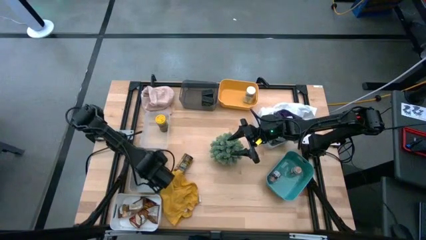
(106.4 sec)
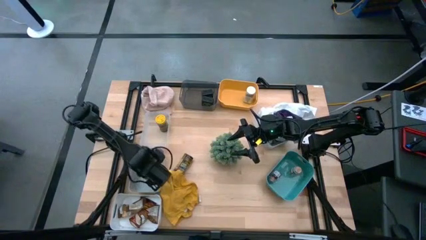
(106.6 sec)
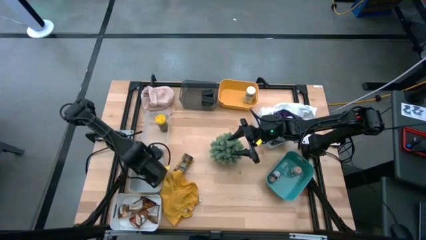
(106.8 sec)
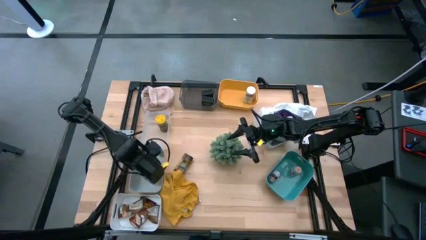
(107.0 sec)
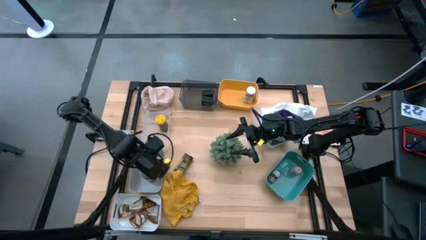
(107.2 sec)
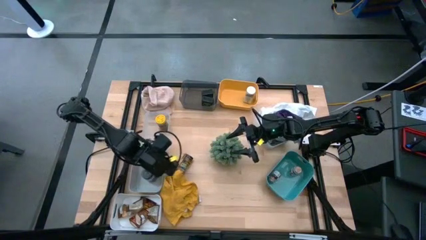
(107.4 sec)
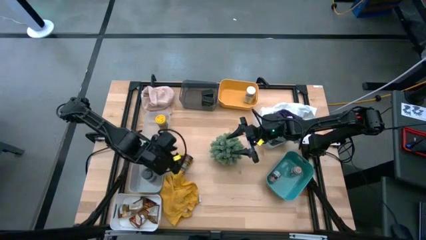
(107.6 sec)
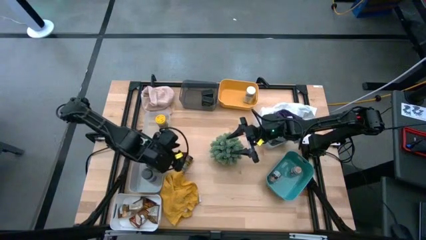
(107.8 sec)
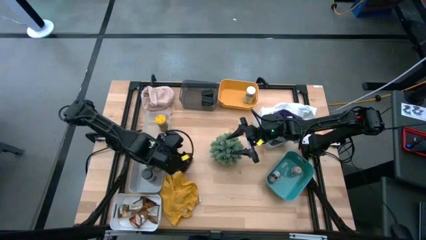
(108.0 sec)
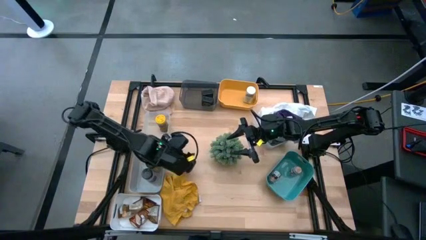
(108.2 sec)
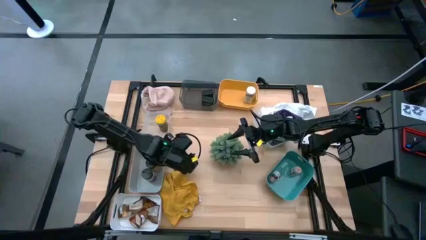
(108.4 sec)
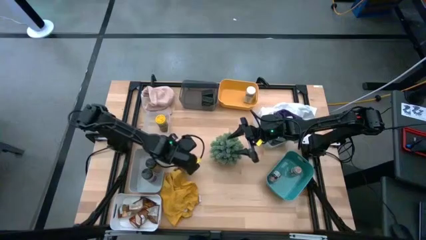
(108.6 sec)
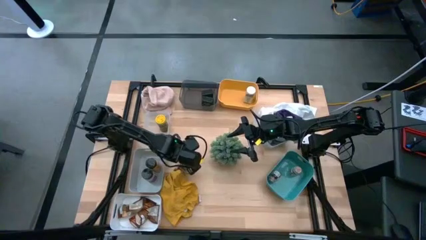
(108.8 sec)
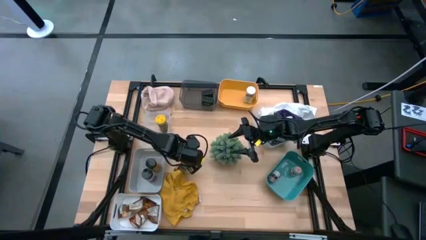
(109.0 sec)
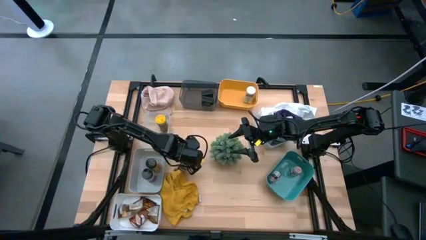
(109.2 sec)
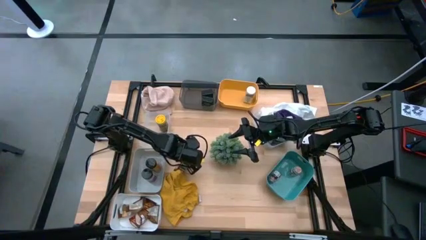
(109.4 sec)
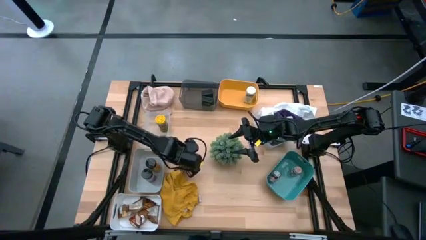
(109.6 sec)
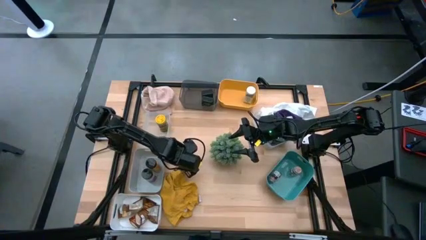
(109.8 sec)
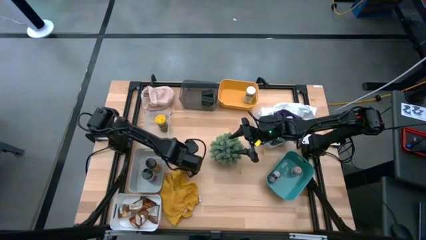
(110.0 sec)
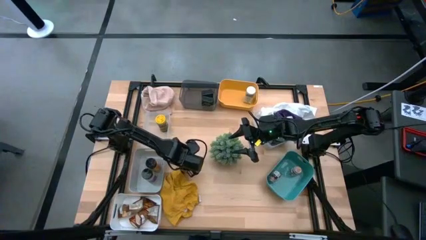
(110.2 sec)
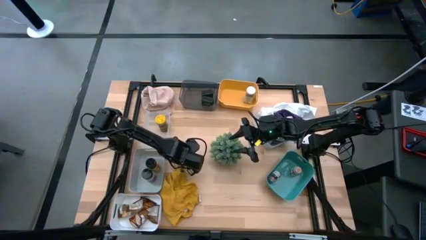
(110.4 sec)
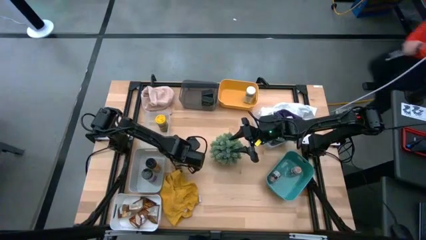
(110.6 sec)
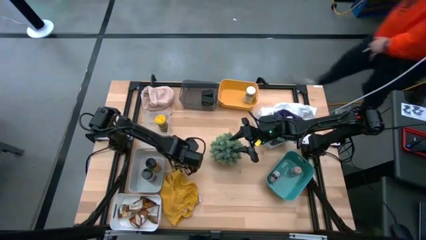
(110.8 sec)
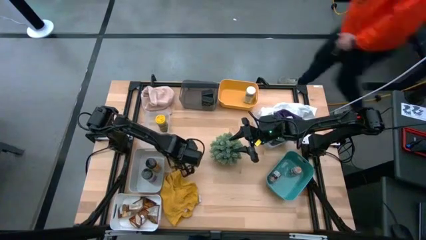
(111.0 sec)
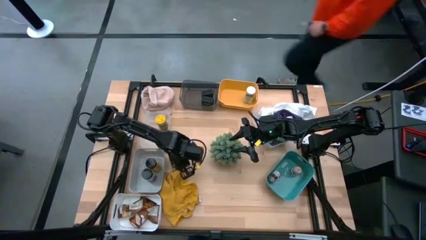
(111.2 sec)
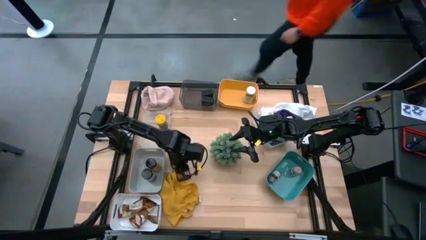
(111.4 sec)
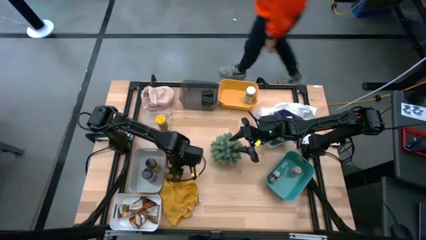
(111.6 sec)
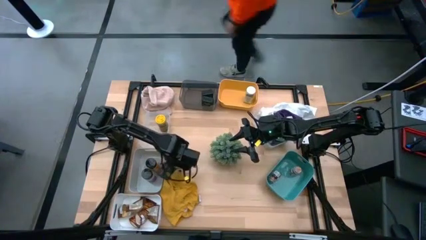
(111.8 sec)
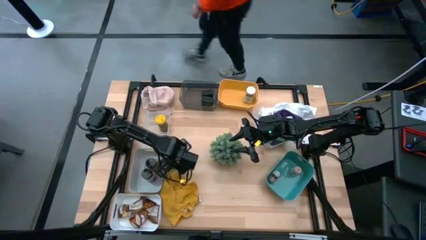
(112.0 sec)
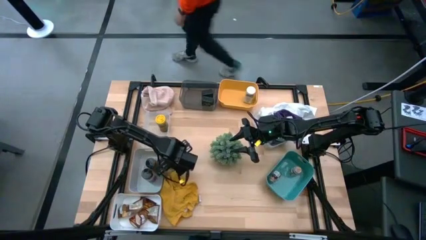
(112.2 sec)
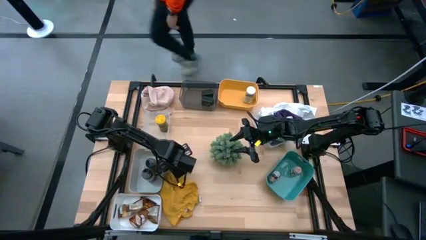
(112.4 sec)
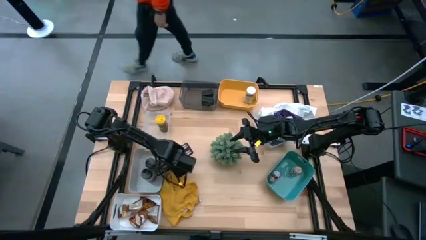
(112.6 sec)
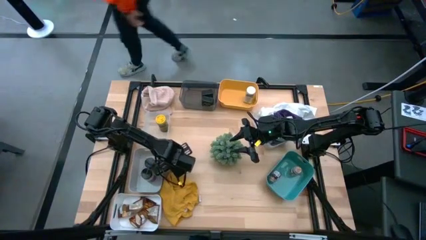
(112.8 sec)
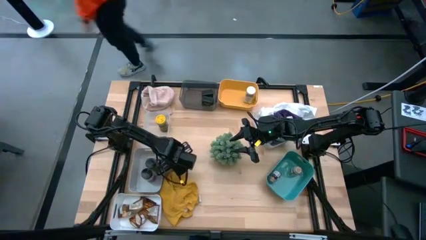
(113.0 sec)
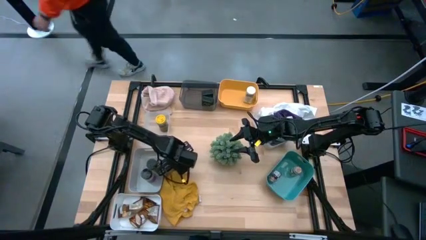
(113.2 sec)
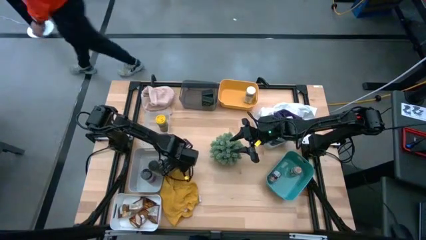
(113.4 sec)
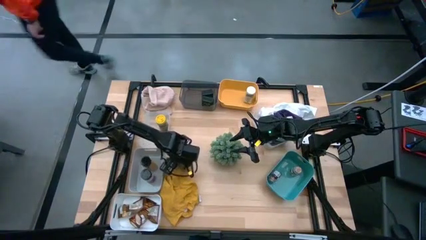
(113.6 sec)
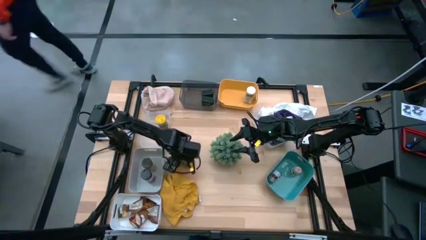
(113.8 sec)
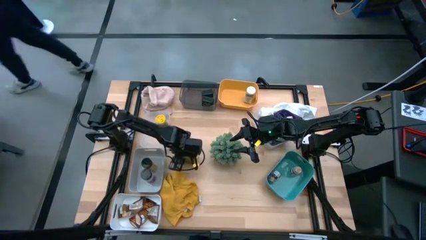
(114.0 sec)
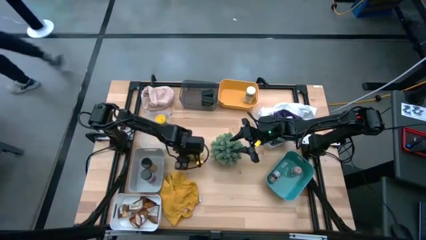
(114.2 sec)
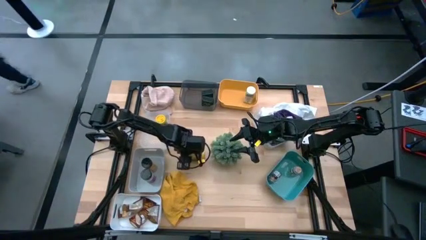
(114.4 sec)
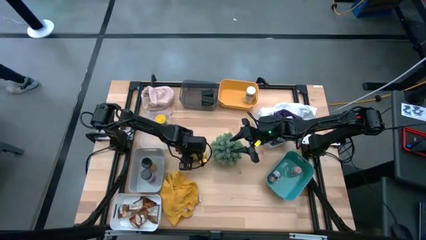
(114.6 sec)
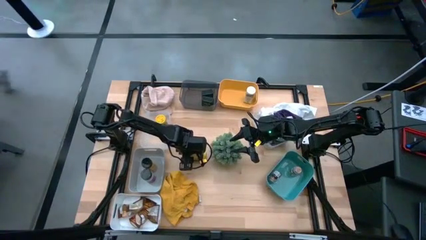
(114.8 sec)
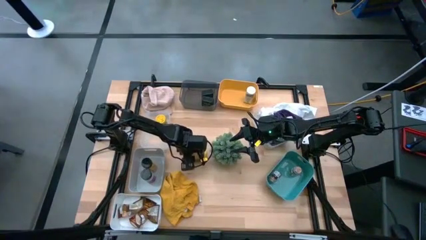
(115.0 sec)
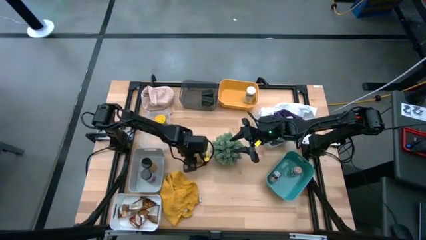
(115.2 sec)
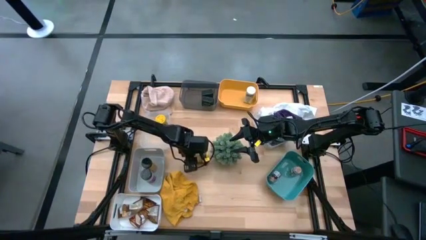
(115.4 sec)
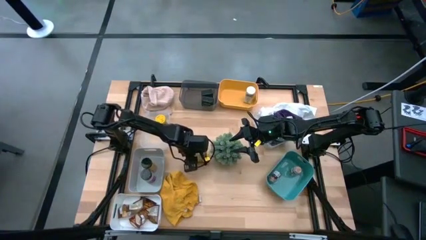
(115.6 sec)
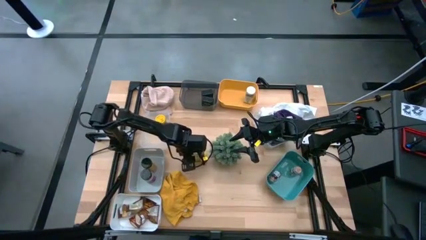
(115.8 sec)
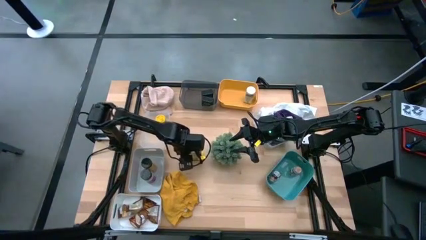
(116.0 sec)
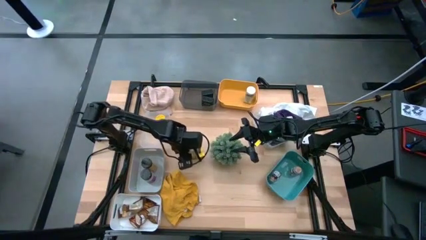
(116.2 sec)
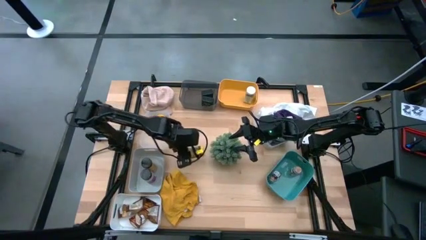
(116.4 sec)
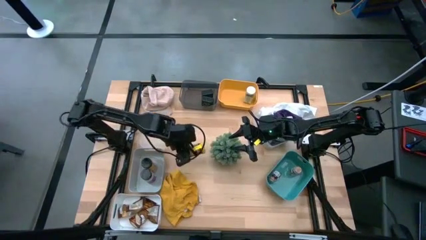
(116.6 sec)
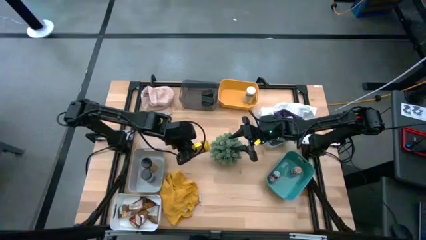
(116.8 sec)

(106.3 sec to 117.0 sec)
Task: Sort spices by type
Put the yellow spice bottle into the transparent bin

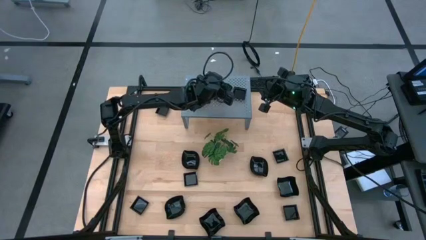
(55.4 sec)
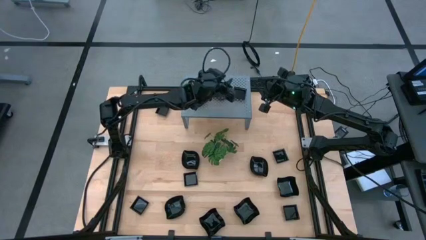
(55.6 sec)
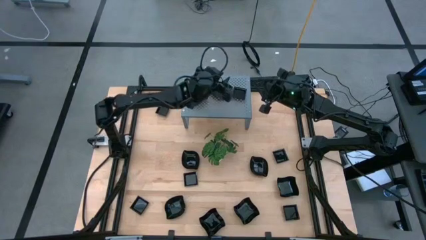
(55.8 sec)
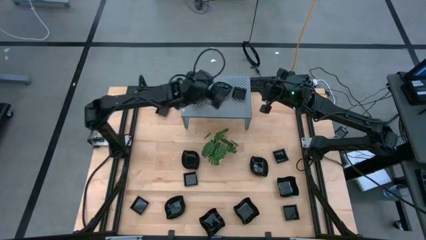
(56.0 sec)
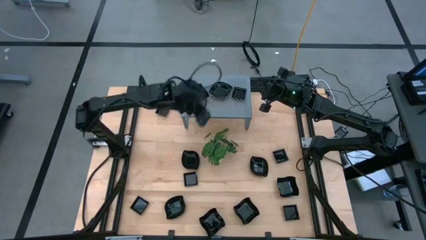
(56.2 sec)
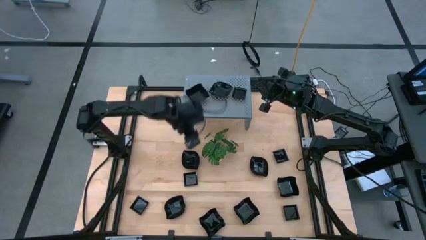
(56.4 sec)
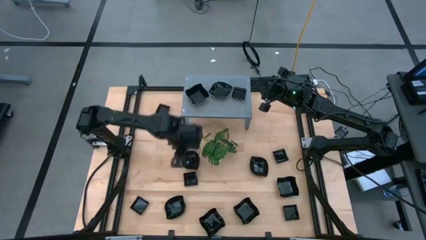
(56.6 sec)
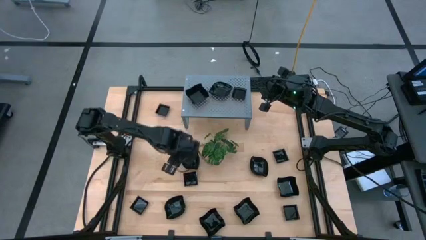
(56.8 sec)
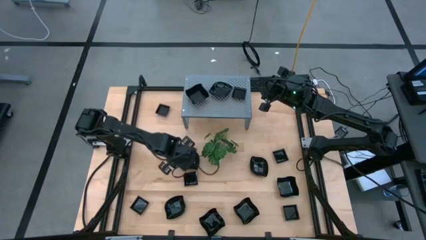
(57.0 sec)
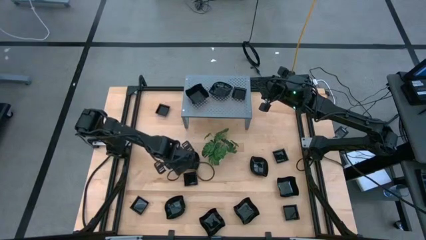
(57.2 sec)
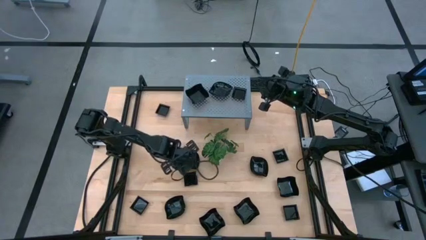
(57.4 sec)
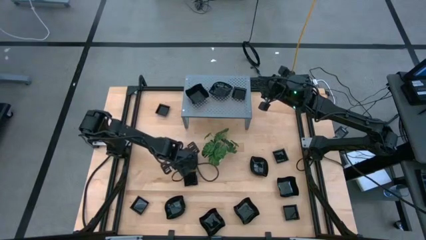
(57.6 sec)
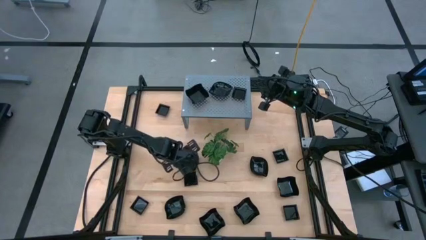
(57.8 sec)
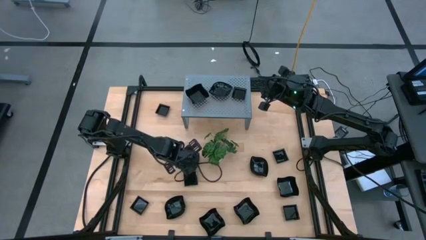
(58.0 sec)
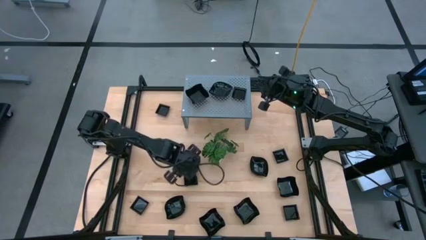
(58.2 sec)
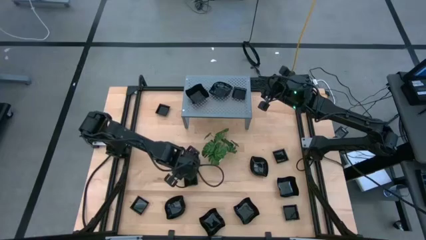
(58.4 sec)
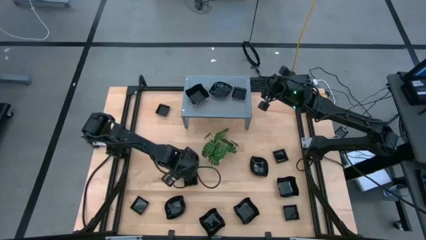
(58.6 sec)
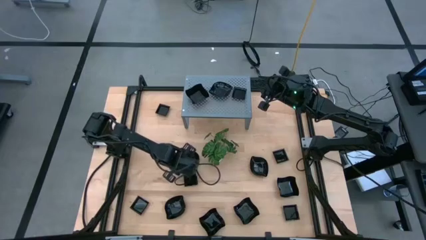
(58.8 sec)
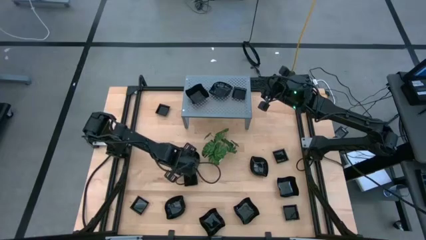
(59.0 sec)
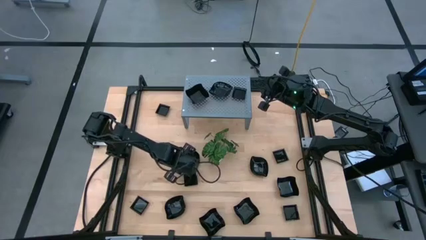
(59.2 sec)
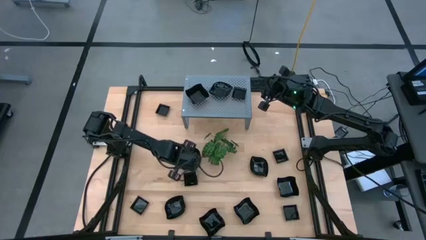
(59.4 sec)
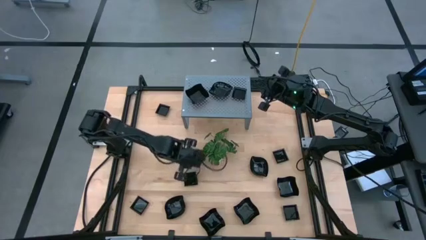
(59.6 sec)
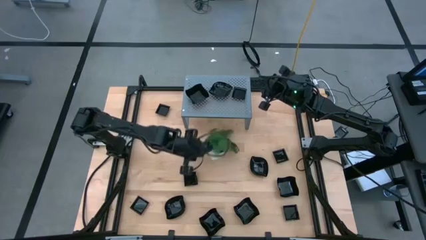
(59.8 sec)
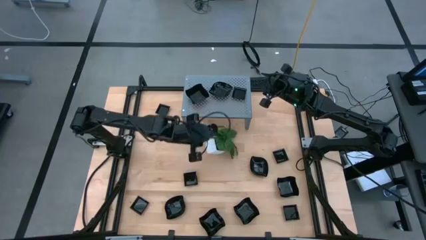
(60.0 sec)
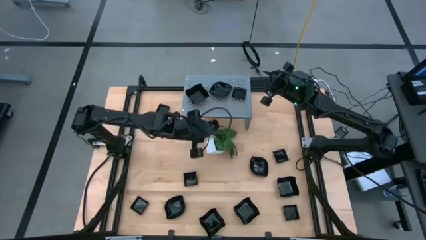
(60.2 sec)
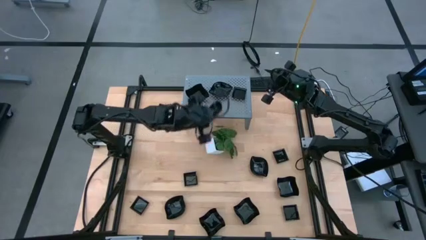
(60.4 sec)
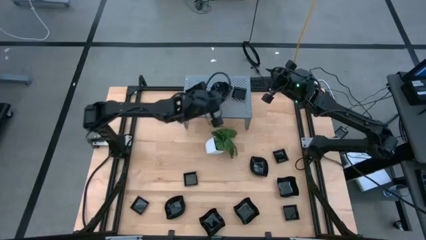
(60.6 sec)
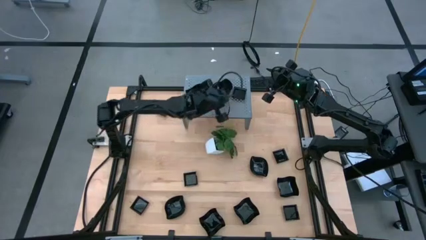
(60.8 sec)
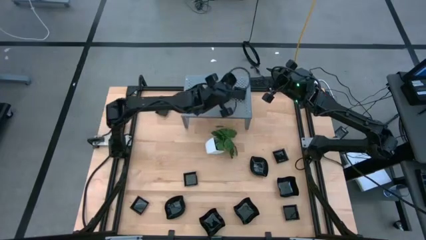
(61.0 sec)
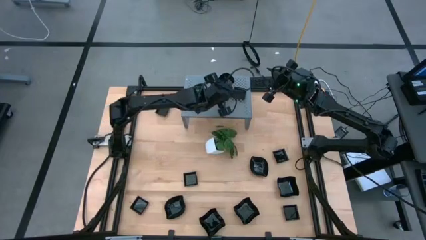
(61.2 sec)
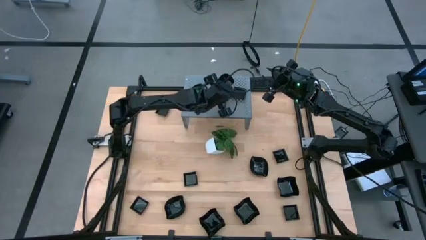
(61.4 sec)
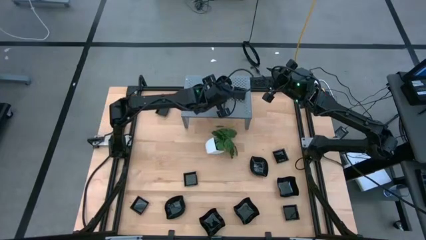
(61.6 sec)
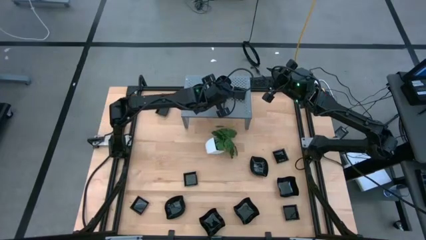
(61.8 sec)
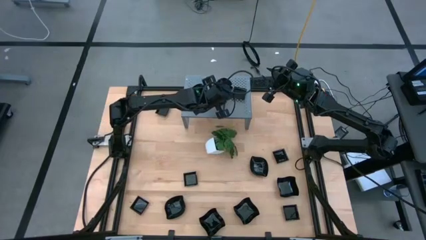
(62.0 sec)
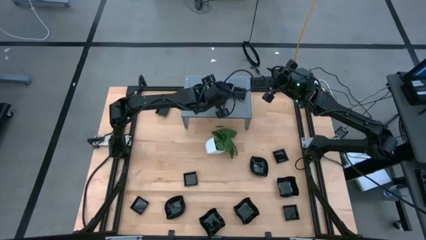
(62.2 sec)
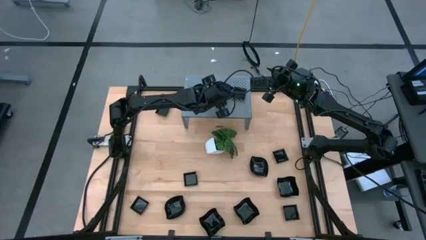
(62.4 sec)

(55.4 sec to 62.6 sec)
Task: Pick & Place Mini shaped plates
Stack the leaf-shaped plate on top of the stacked leaf-shaped plates on the shelf
